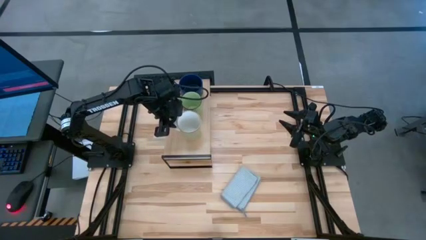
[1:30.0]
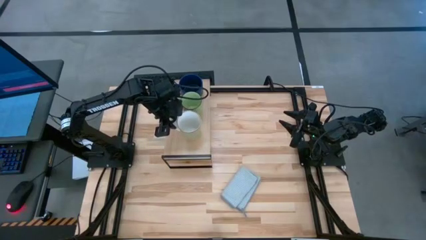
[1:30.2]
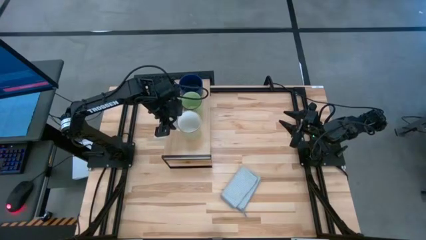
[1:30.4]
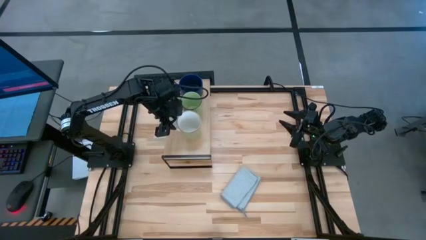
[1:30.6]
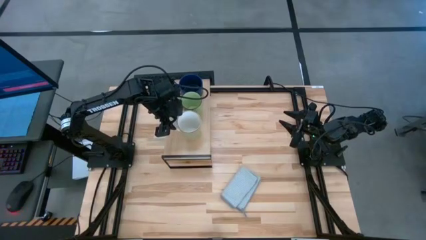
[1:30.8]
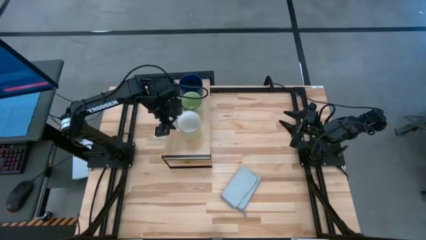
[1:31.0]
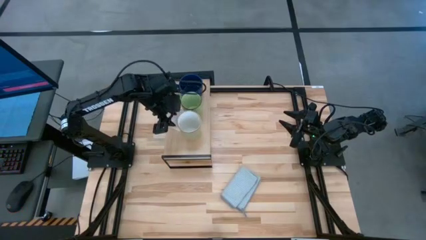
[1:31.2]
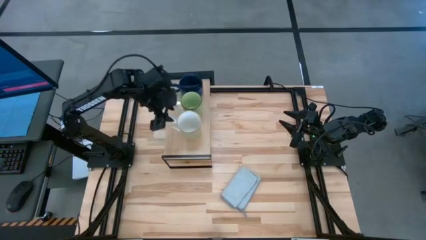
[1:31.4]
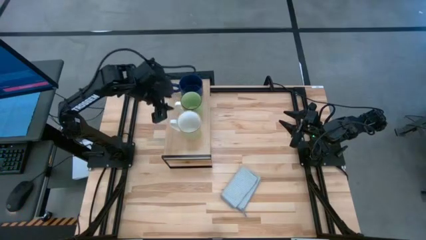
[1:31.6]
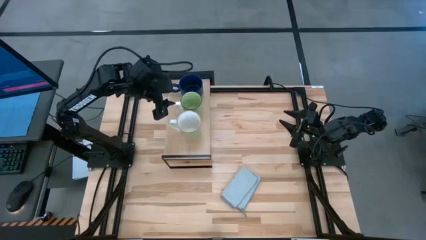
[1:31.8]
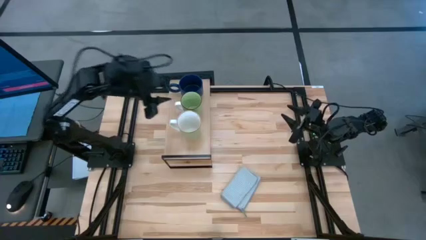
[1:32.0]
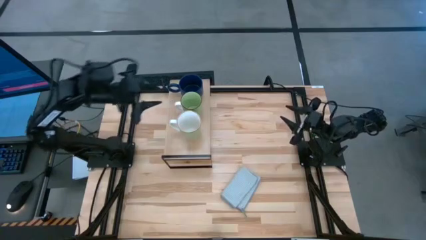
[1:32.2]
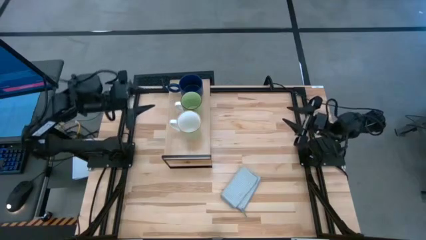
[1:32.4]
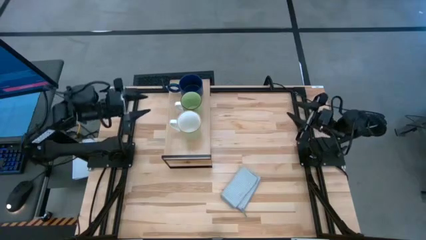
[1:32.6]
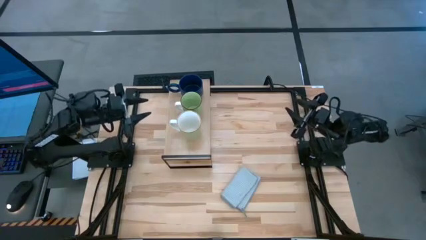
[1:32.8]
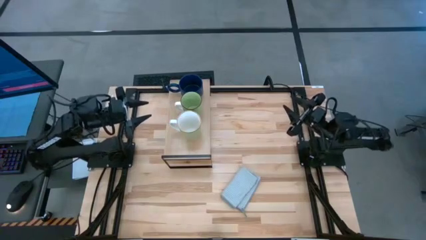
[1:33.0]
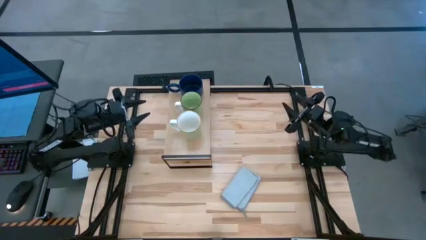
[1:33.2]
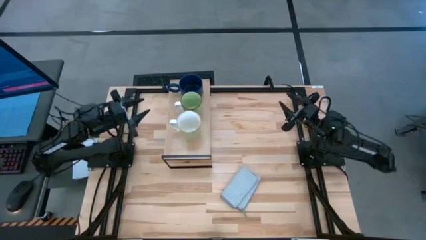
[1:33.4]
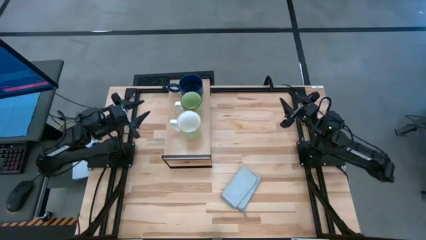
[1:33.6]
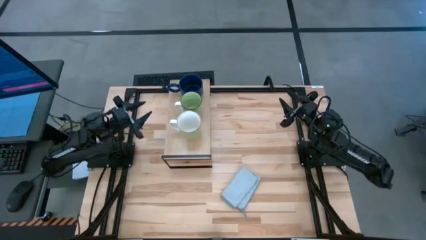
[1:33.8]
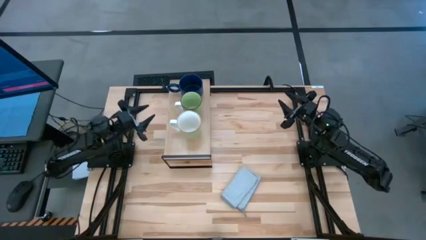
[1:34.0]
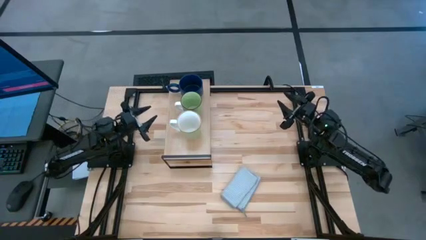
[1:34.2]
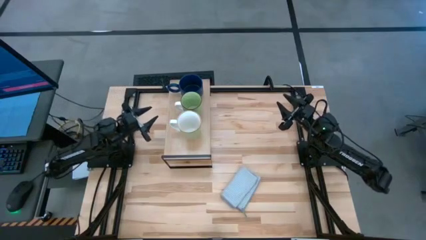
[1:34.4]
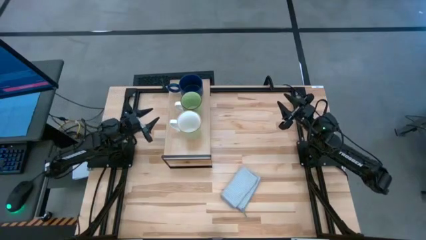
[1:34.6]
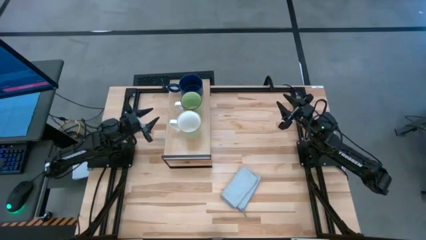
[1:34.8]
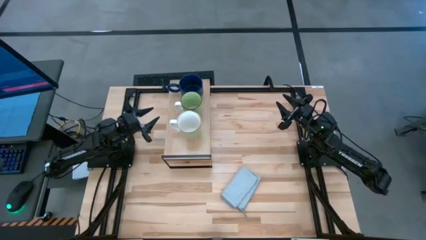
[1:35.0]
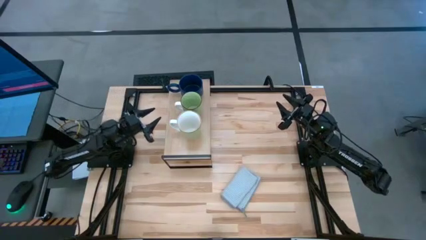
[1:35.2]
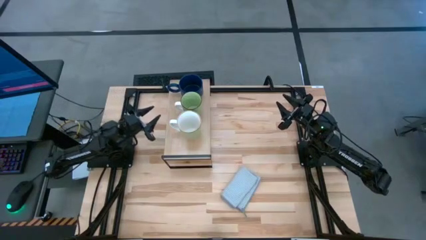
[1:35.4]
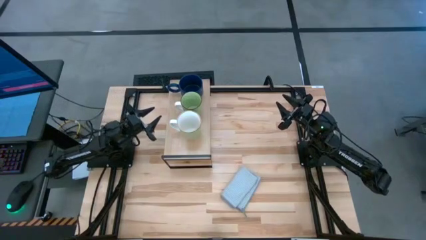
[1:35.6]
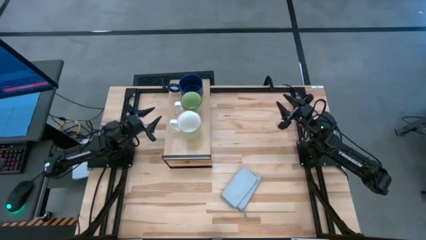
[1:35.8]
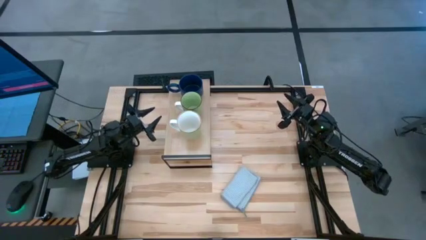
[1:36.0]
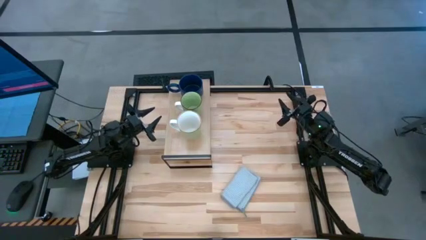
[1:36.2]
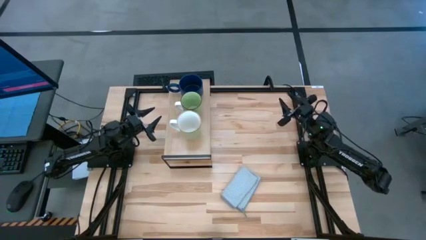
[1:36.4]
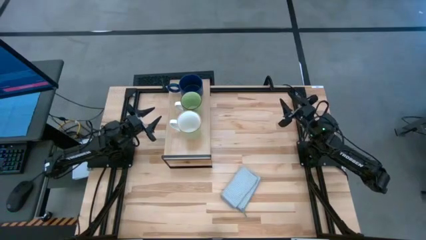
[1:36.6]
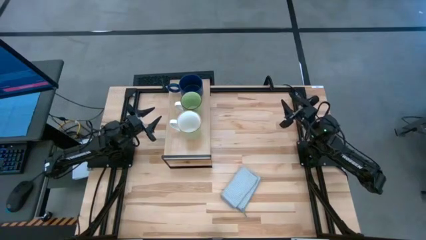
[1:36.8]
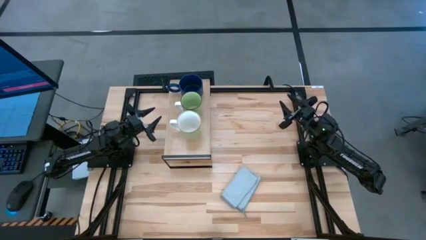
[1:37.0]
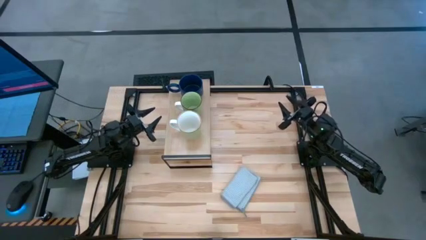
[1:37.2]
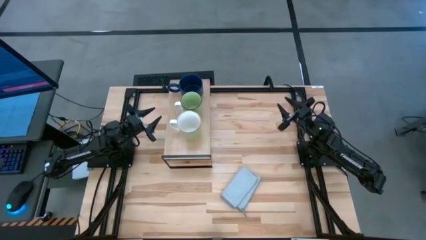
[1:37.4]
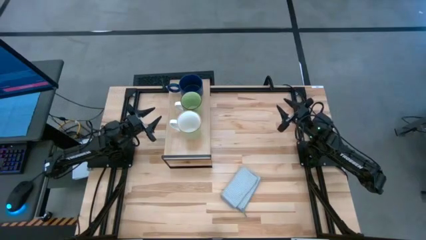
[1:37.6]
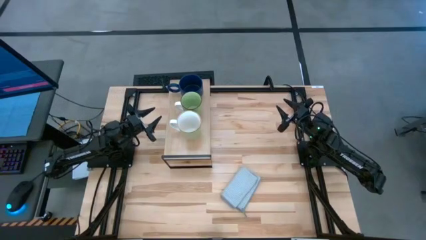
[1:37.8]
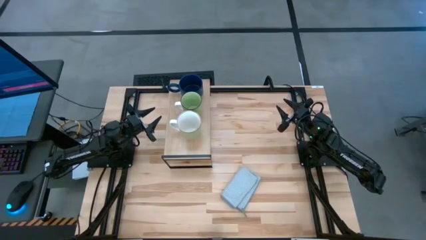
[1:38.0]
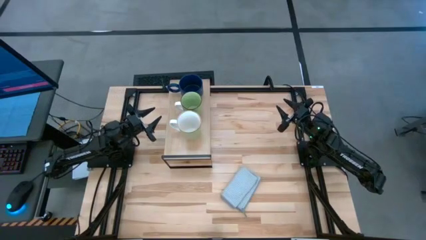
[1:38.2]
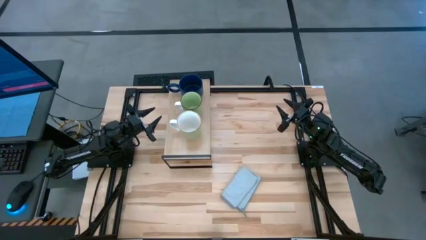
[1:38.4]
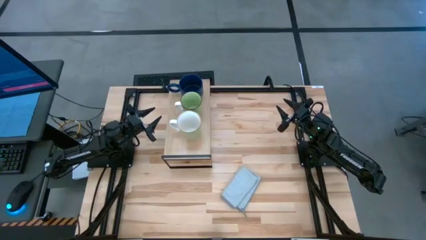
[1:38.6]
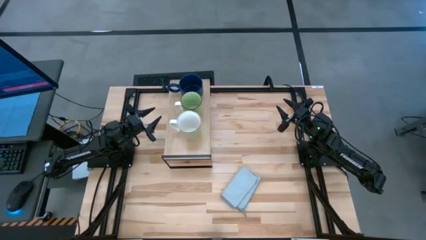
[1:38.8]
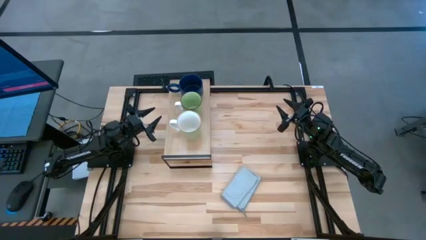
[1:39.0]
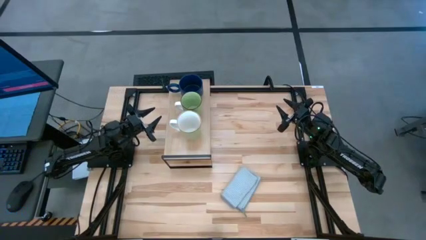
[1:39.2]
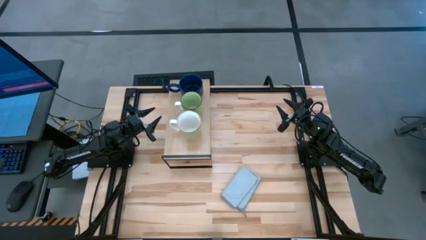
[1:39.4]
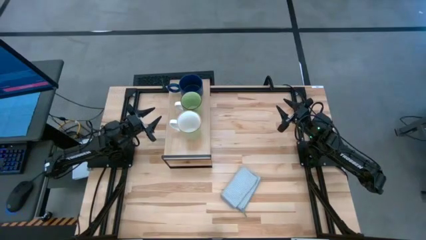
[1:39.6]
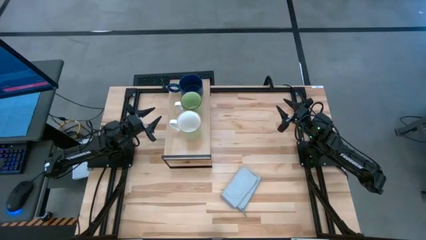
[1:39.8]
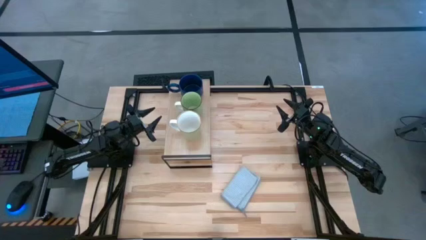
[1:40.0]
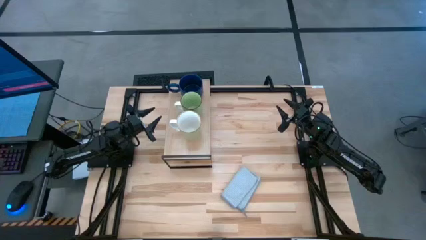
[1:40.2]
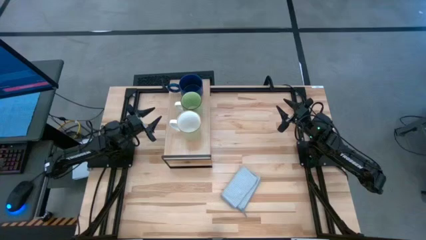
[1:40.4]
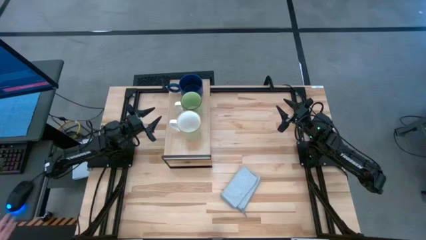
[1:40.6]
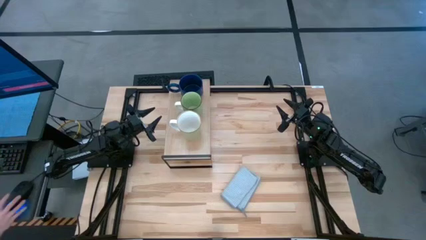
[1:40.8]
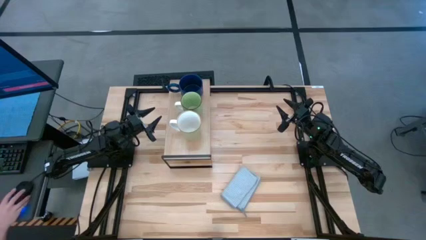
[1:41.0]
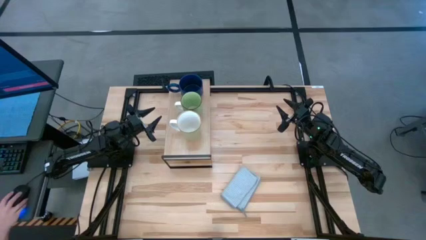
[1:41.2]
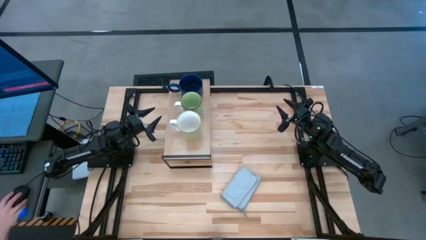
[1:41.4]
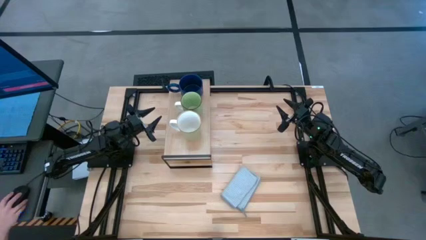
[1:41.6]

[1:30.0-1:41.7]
Task: Stack small to large cups/mugs on shelf
Return to Home Position

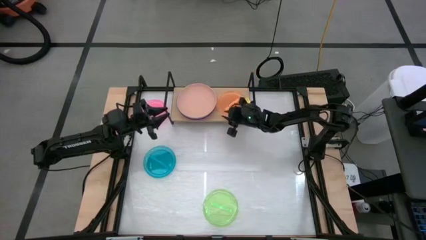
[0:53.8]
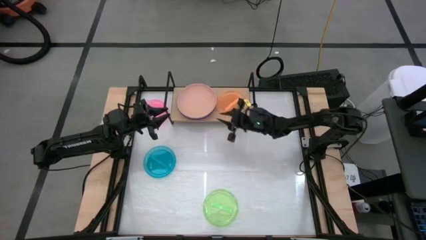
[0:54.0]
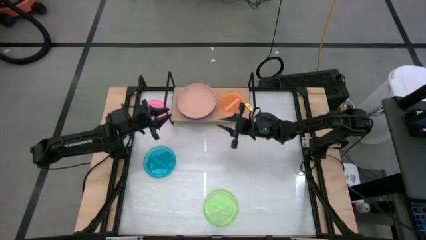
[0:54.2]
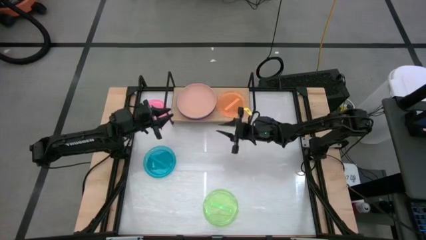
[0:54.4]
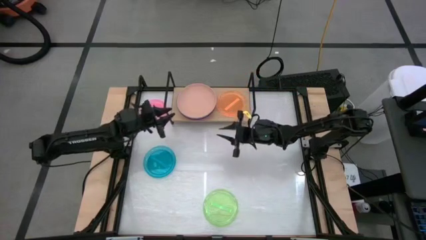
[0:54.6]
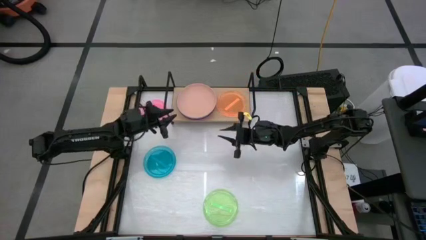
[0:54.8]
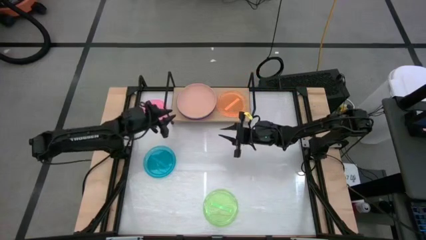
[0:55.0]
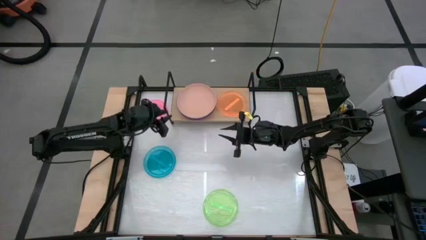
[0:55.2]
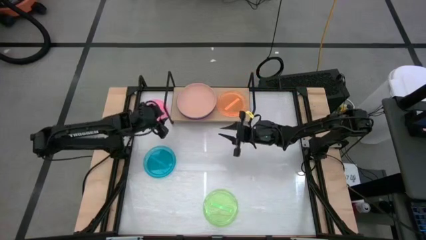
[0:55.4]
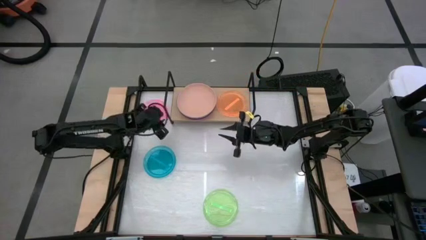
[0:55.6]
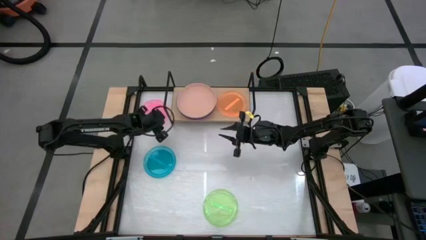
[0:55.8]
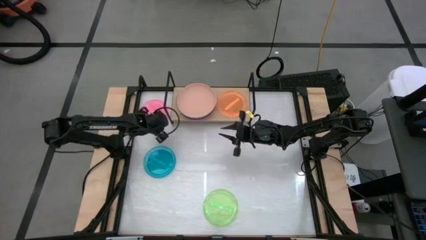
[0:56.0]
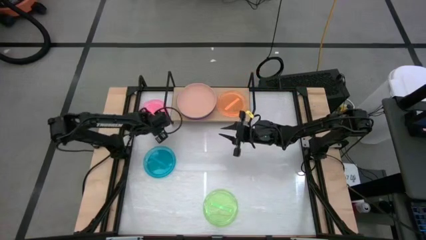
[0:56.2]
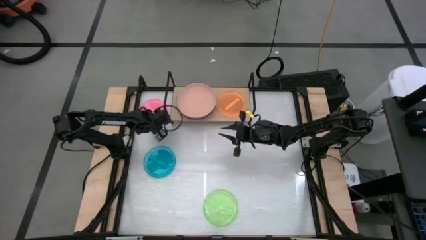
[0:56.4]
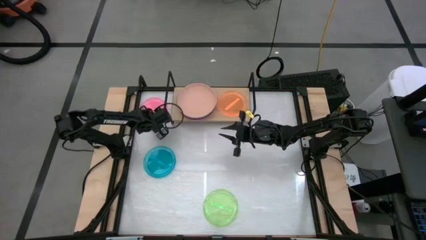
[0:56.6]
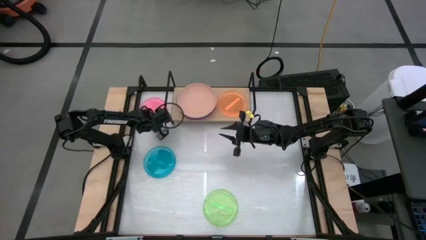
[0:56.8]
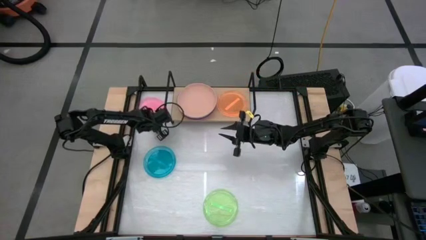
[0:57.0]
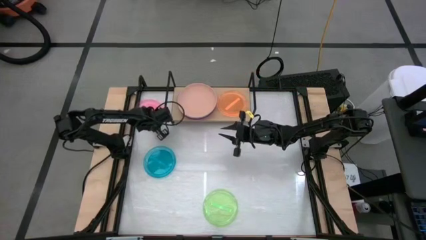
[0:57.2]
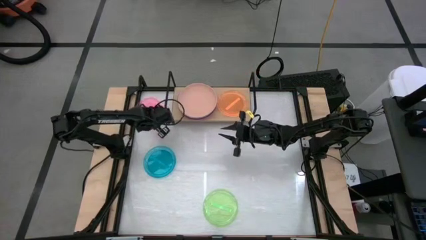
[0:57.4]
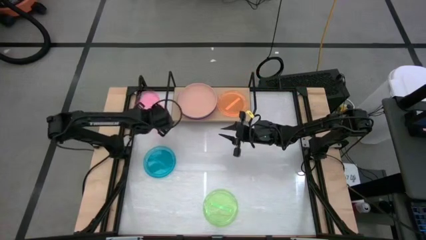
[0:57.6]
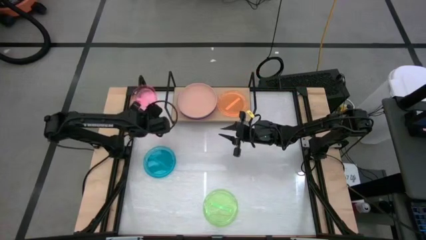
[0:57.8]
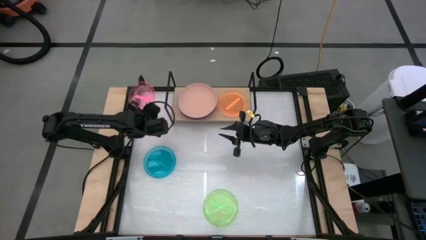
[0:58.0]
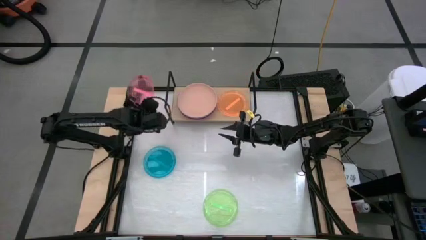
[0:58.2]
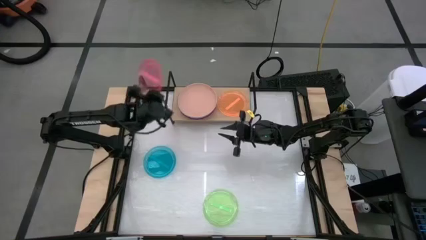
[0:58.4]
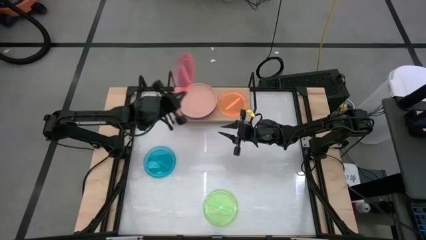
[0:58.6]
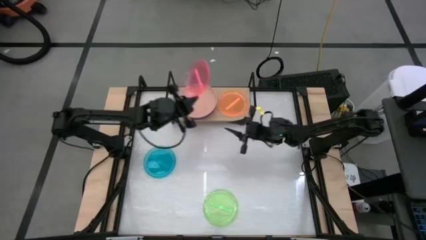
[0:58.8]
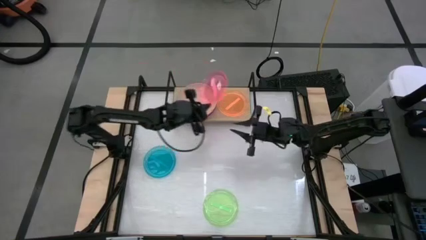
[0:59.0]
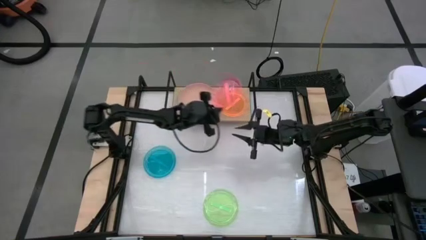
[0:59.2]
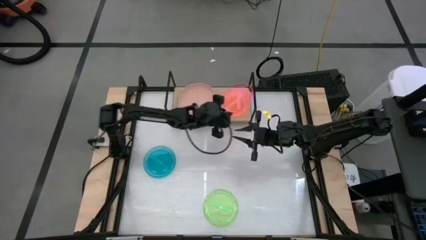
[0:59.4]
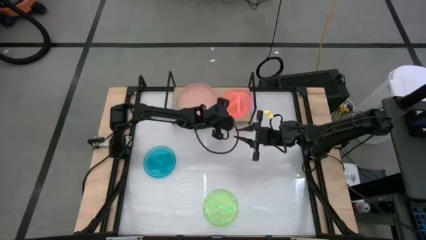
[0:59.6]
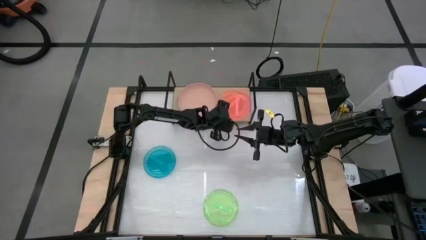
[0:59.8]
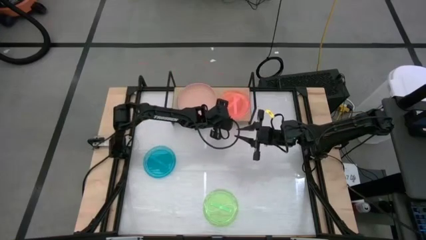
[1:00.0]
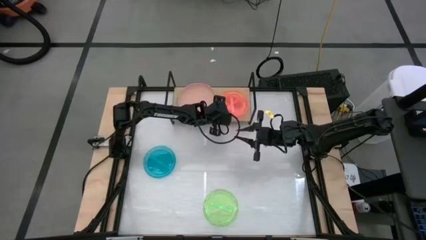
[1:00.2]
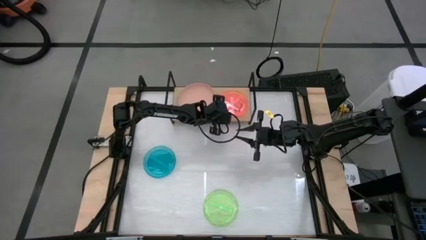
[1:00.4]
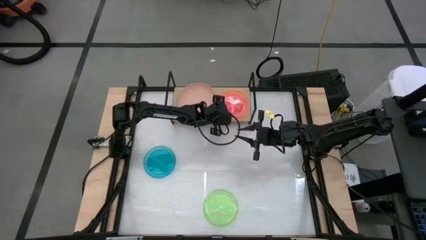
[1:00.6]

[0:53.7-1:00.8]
Task: Place and stack plates onto a shelf
Stack the pink transparent plate on top of the orange transparent plate on the shelf
